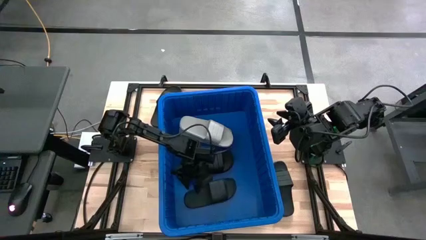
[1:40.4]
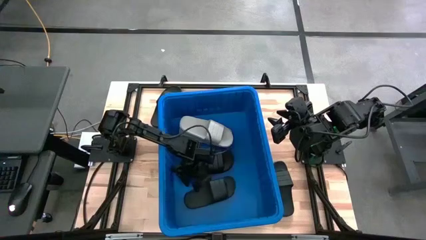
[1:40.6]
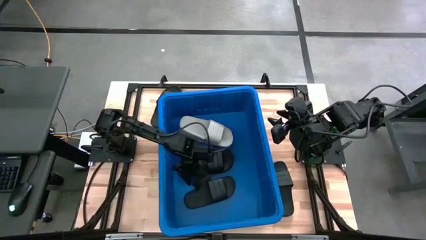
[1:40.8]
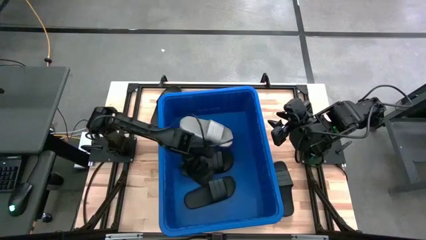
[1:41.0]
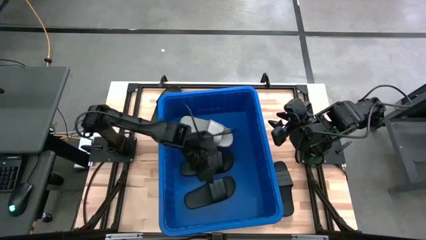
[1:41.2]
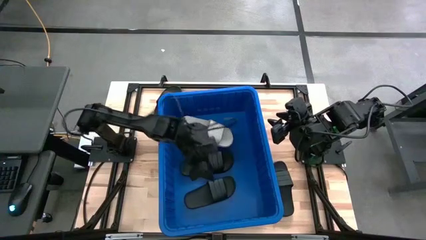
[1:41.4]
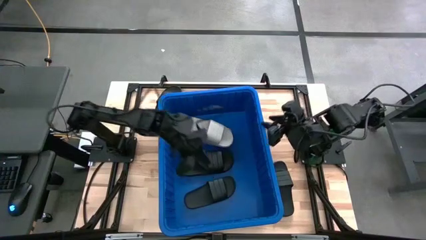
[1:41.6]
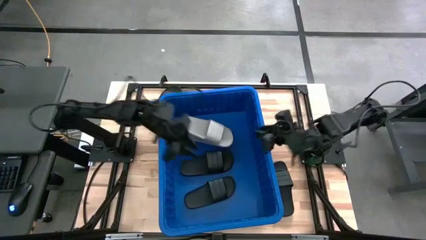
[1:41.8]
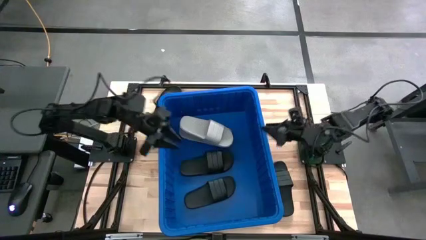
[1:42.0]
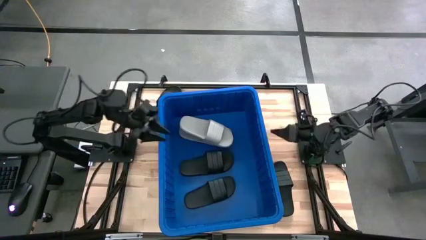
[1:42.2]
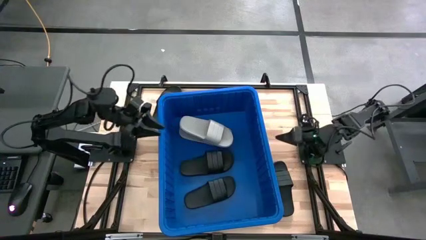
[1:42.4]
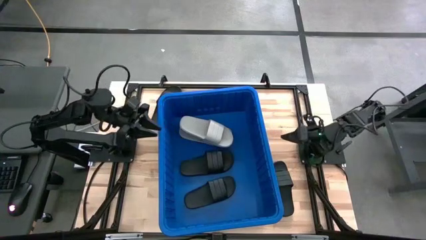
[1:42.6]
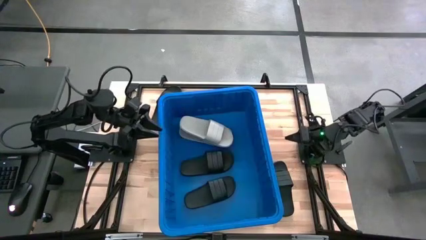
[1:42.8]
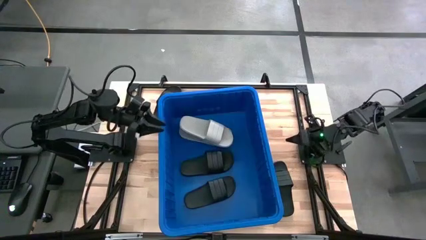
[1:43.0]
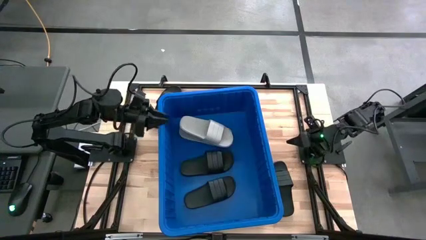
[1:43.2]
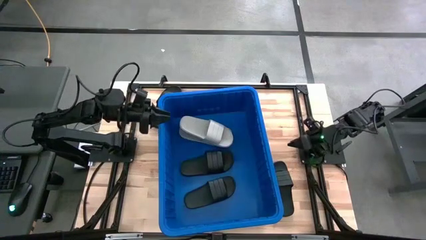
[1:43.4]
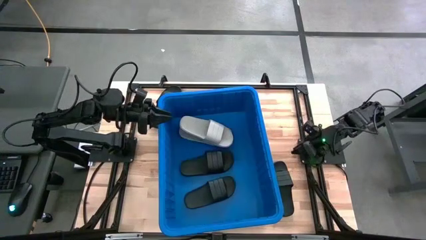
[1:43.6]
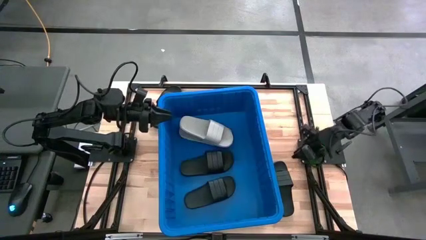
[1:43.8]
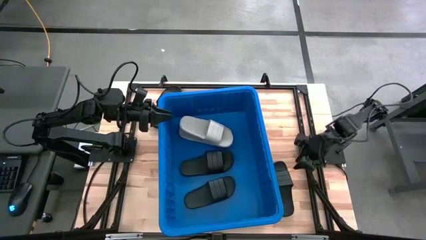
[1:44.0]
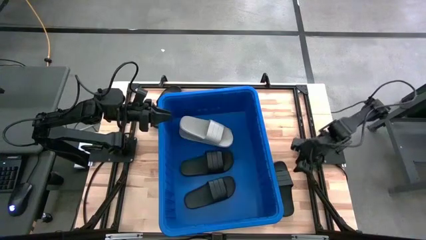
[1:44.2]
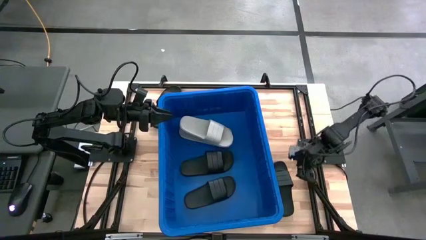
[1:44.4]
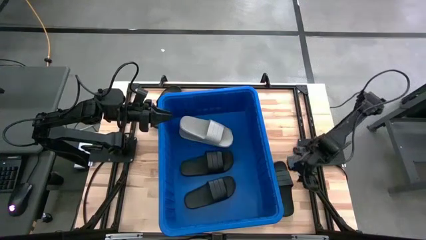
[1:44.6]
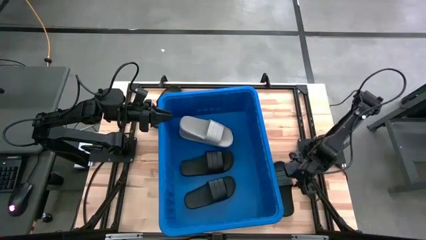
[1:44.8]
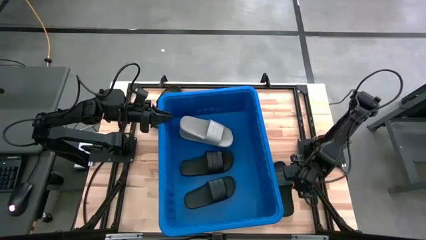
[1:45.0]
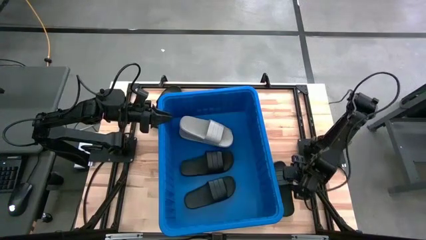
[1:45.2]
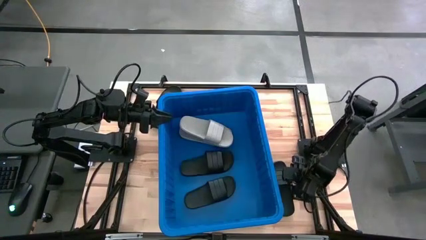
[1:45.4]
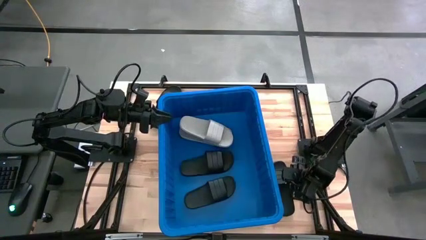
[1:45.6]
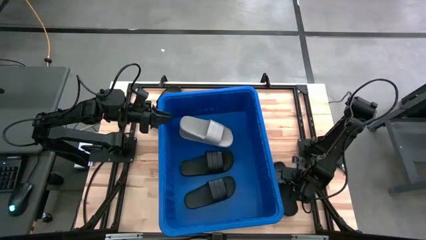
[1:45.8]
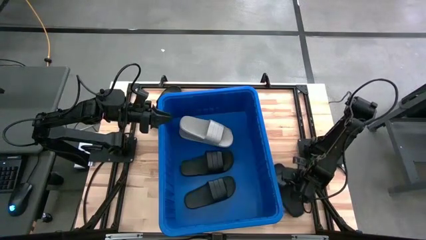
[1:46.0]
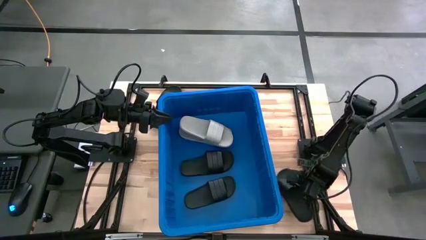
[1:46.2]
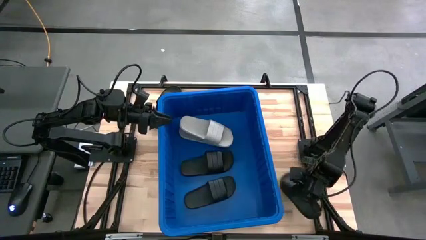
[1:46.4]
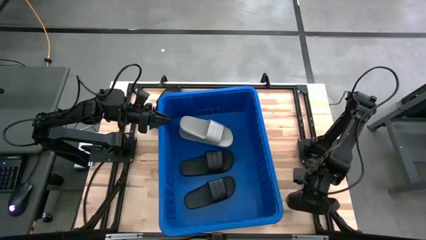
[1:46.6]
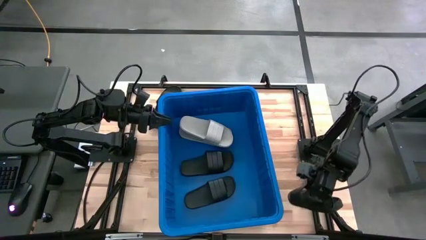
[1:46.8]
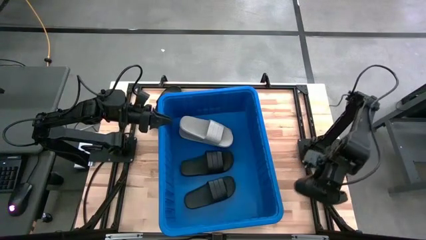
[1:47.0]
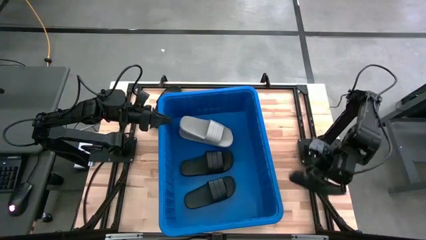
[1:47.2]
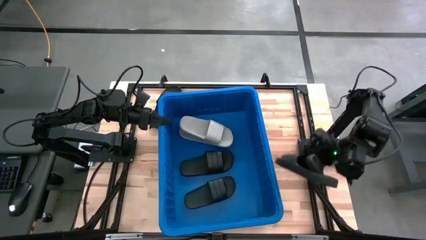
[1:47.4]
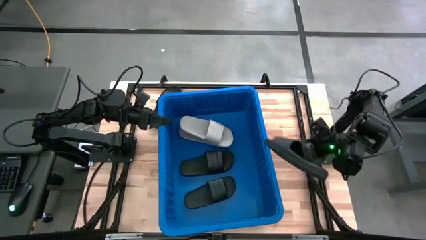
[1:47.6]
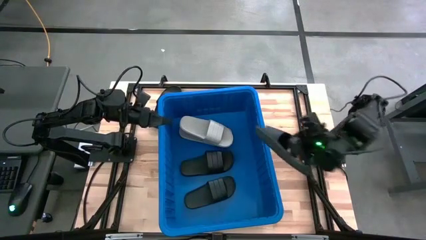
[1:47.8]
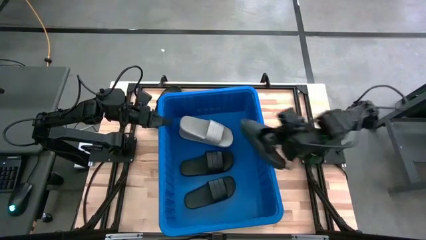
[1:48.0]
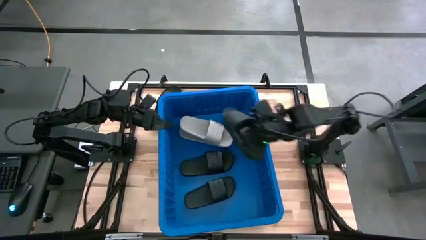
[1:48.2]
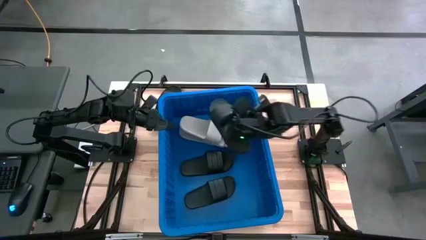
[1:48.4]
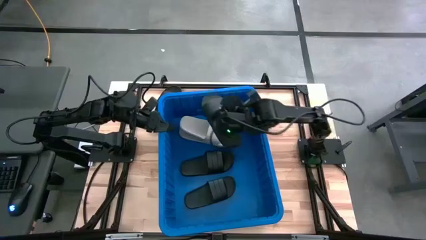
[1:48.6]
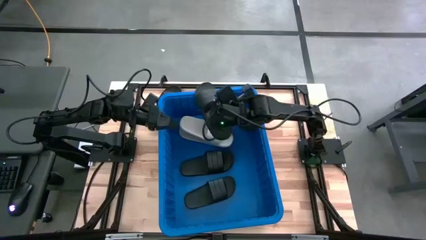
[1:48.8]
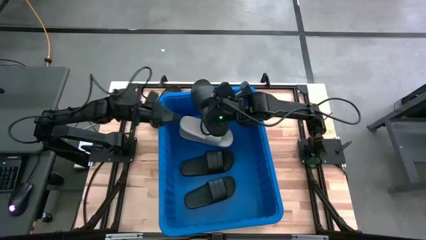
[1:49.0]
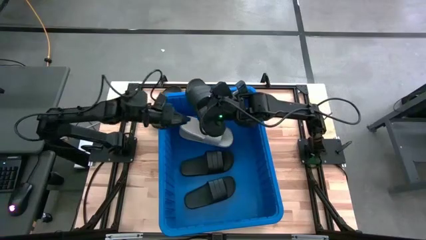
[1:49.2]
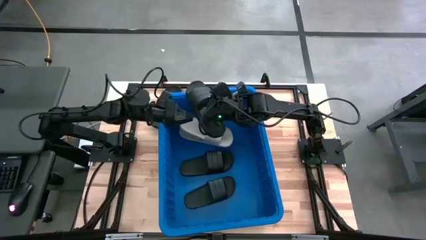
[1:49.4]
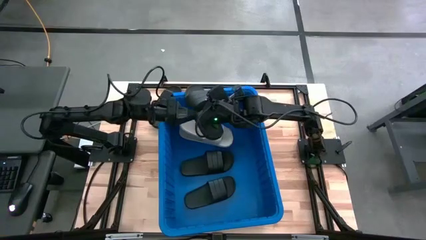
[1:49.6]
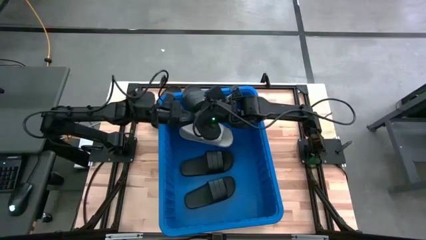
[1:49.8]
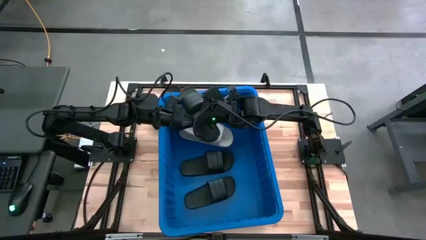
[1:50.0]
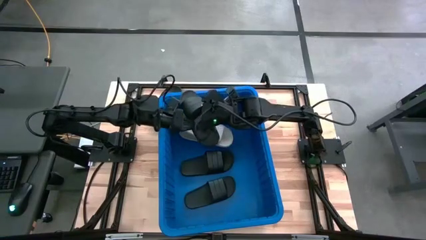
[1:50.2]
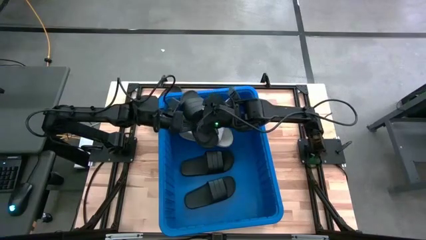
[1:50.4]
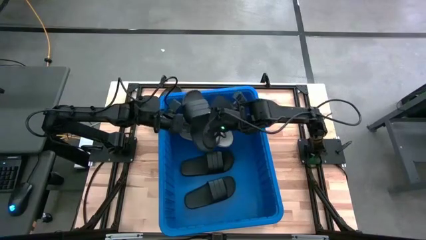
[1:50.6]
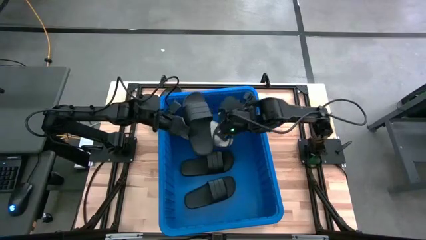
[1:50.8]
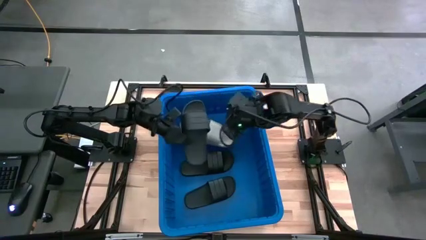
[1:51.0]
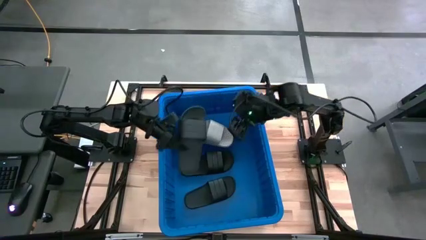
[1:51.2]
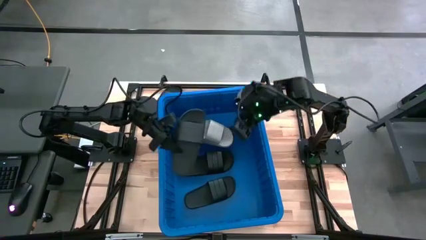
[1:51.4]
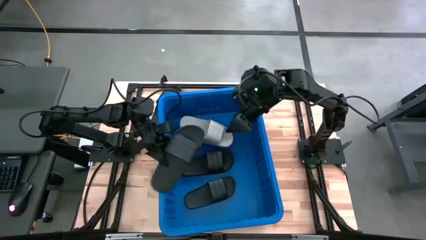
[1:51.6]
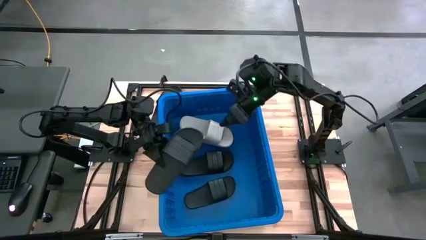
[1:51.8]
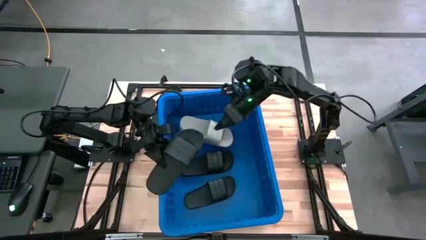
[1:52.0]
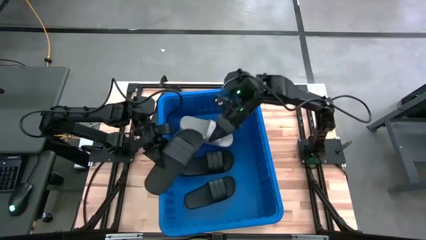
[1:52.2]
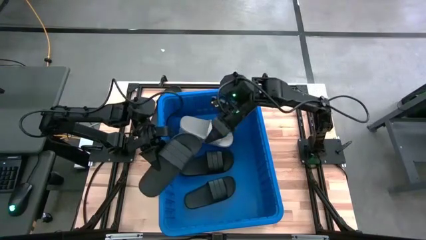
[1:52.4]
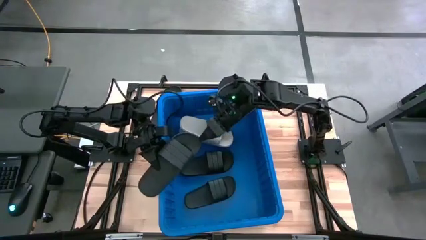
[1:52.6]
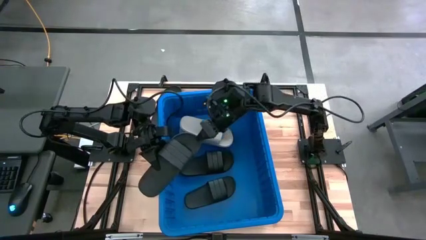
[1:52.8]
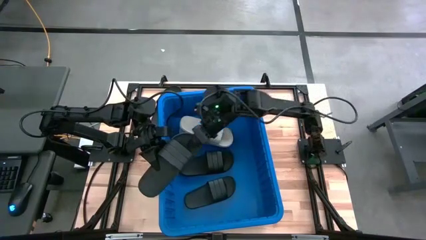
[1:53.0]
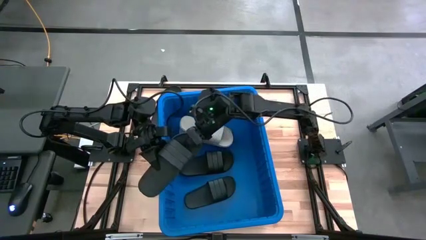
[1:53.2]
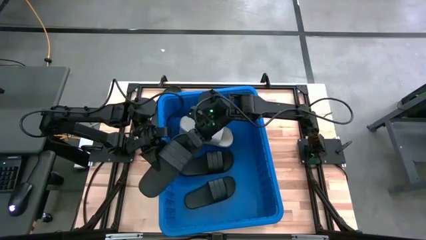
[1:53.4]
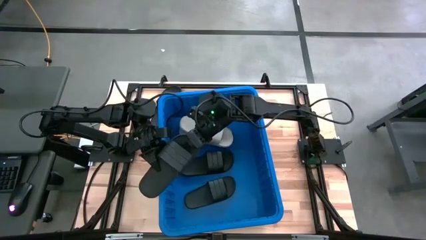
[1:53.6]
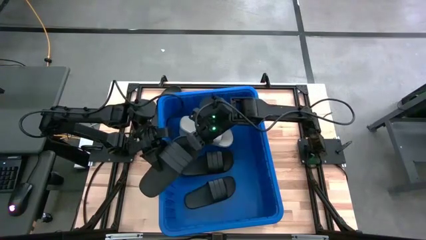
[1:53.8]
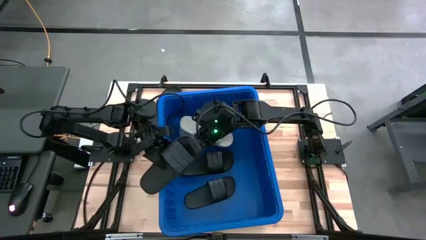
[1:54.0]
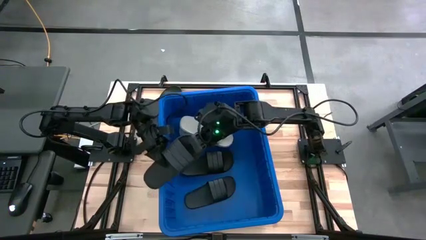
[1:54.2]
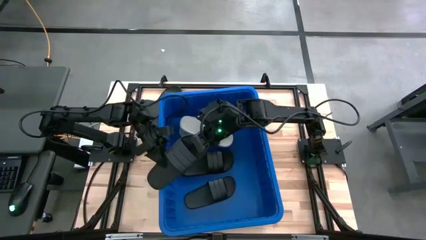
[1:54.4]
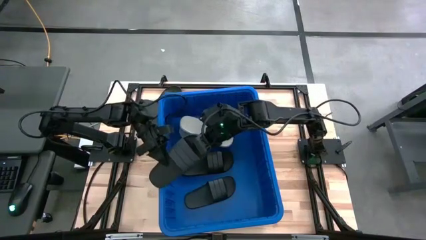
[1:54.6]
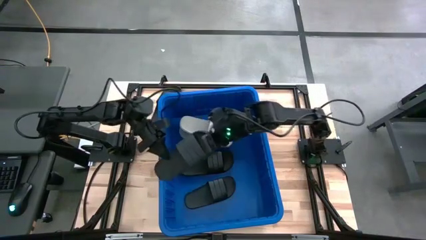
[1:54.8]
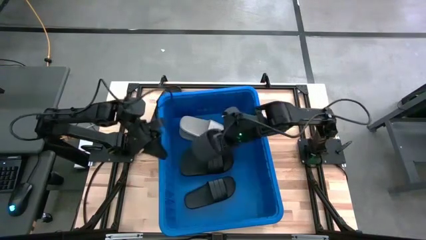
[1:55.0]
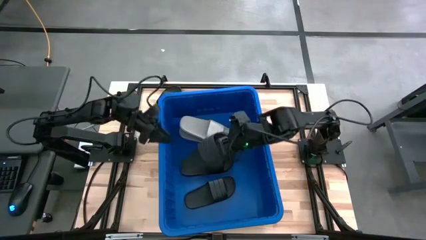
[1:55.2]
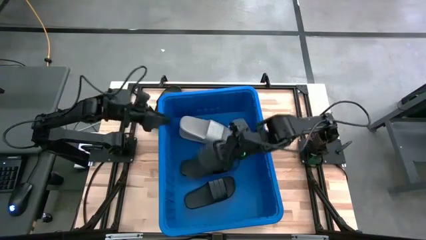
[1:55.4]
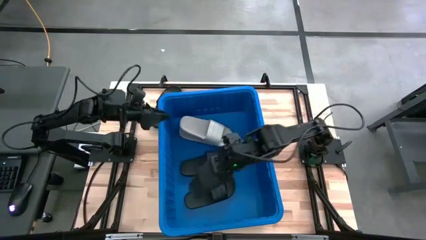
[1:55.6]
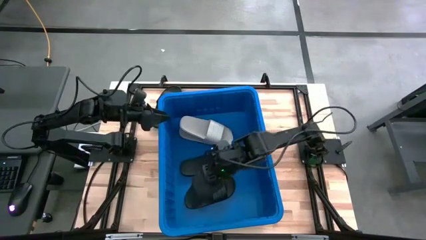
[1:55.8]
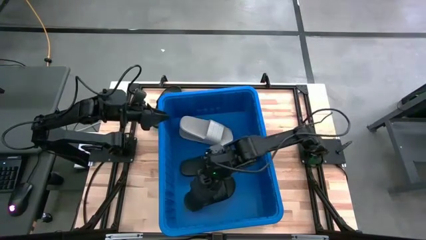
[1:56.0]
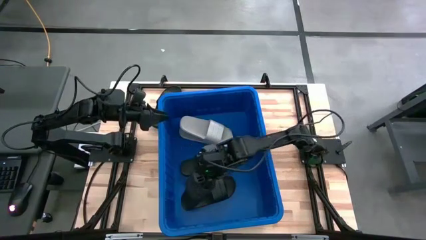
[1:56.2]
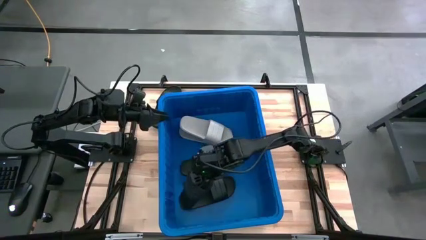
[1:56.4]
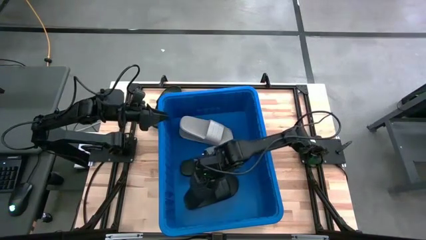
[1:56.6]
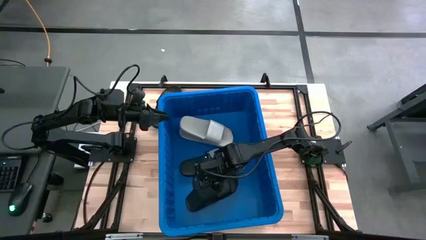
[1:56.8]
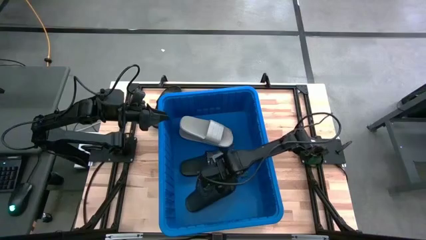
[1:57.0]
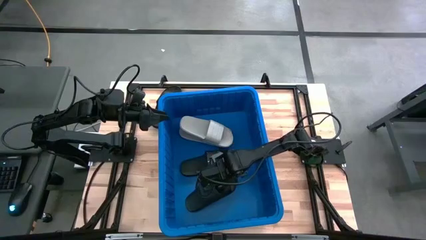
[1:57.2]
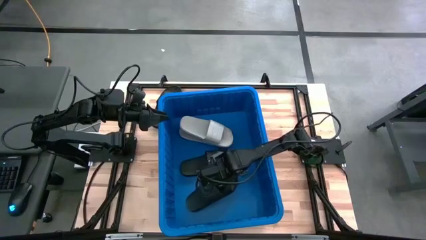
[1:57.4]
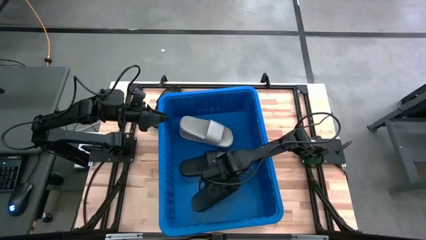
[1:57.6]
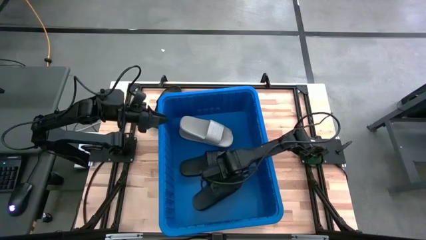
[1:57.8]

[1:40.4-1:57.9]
Task: Pick and place slides into bin
Stack the slide on top of the black slide in the blue bin
